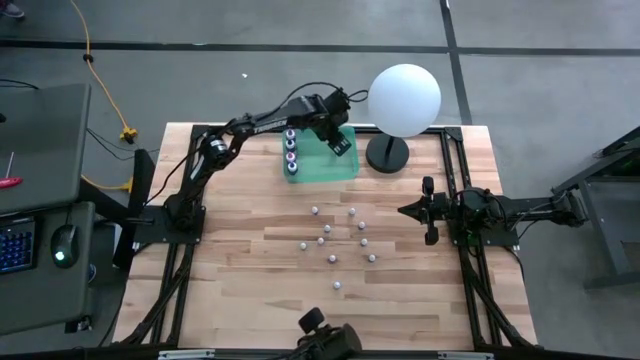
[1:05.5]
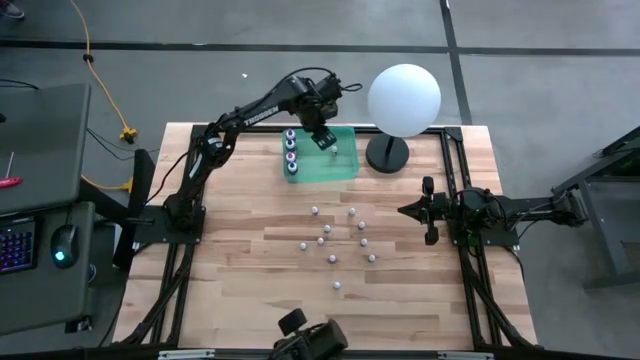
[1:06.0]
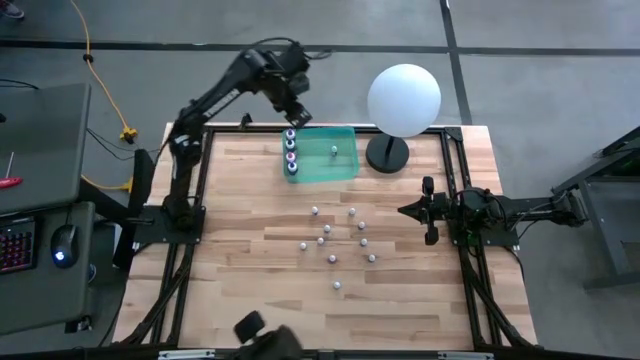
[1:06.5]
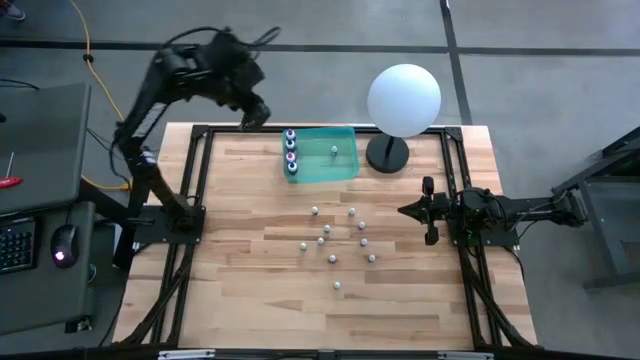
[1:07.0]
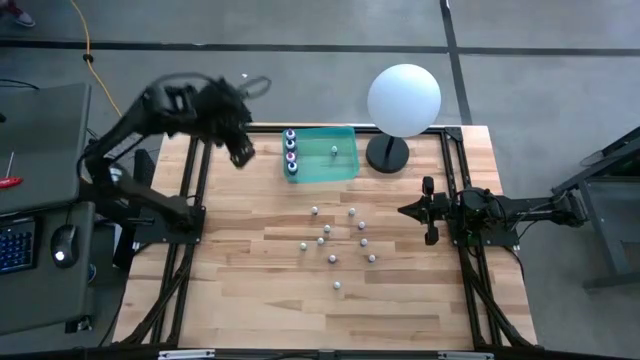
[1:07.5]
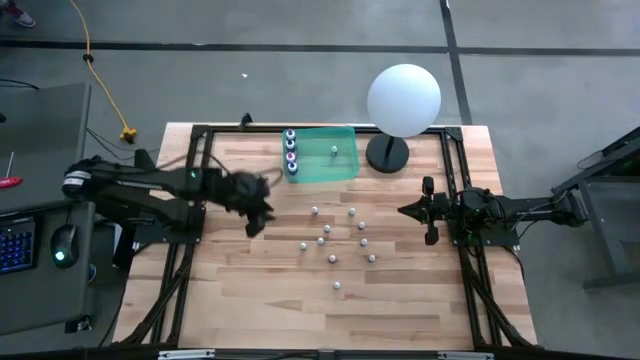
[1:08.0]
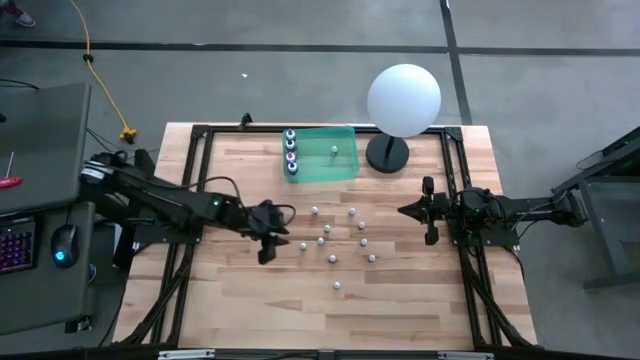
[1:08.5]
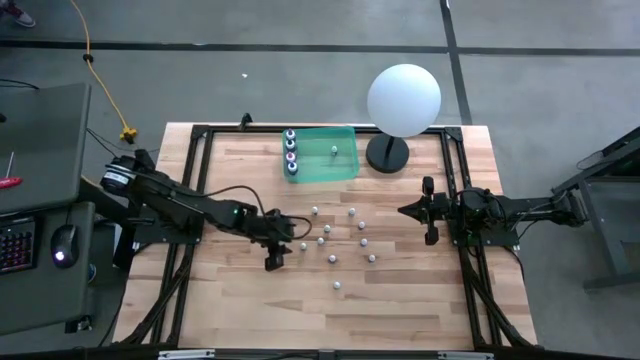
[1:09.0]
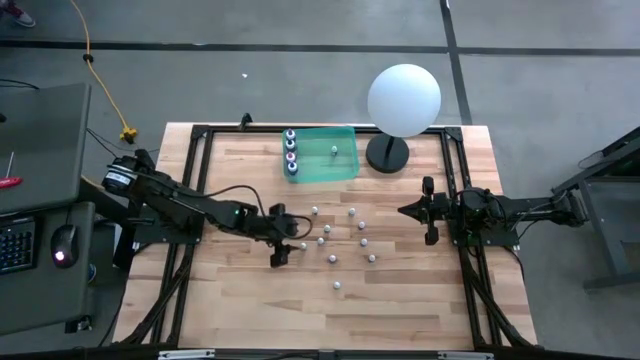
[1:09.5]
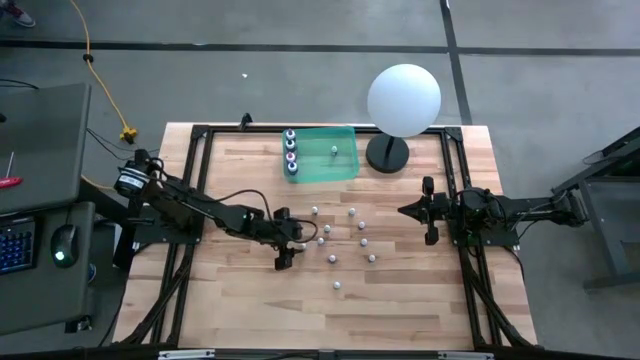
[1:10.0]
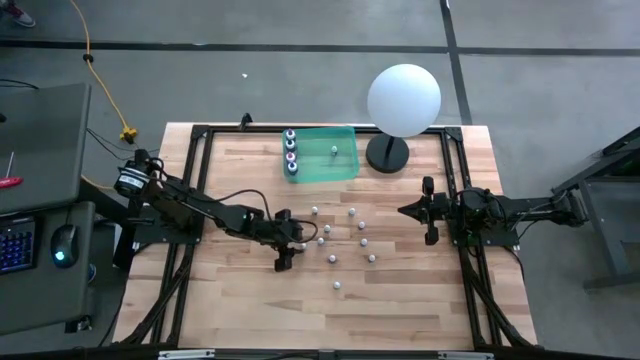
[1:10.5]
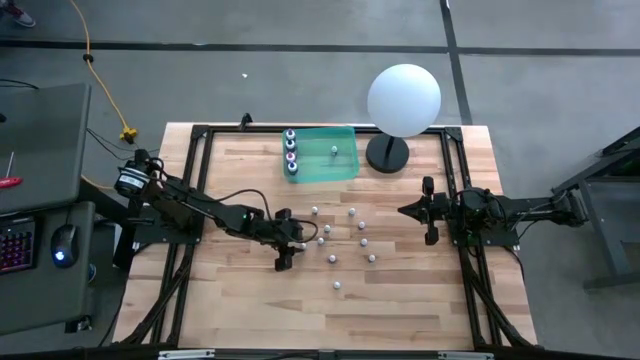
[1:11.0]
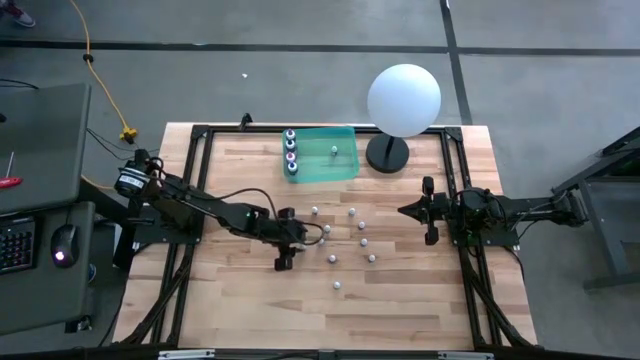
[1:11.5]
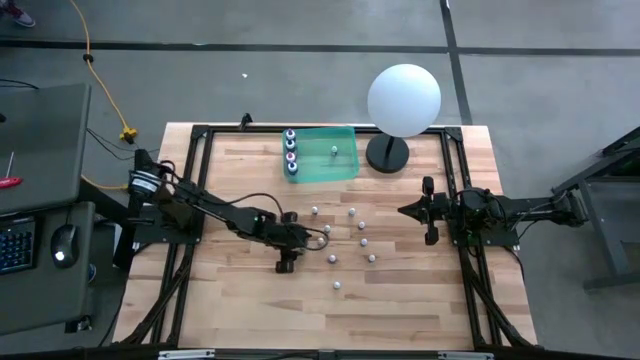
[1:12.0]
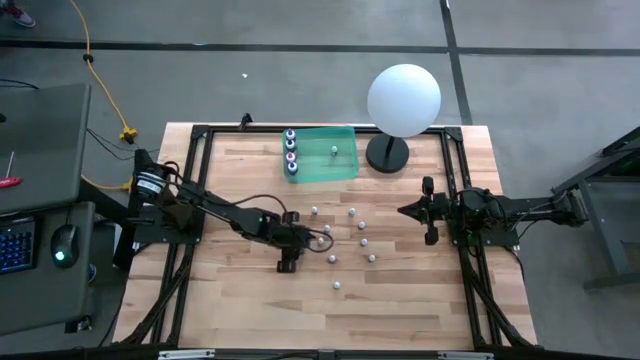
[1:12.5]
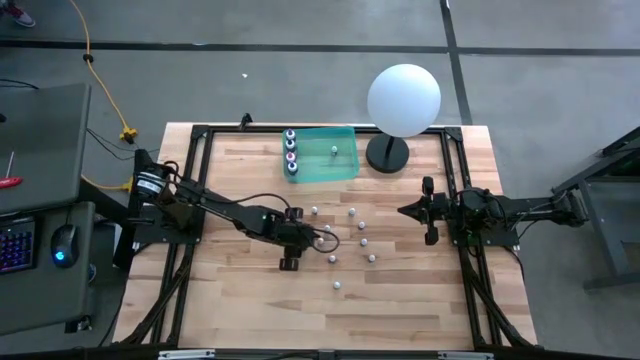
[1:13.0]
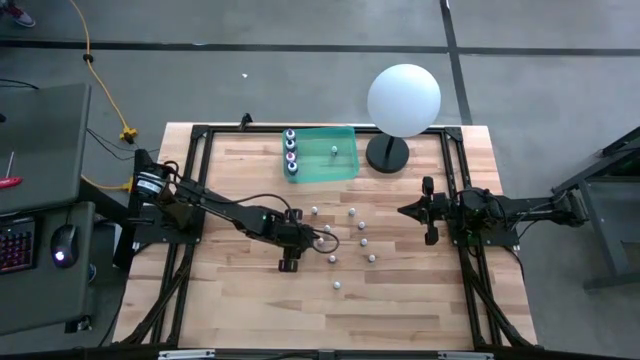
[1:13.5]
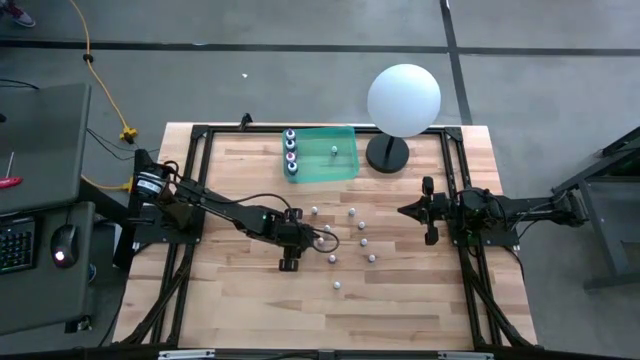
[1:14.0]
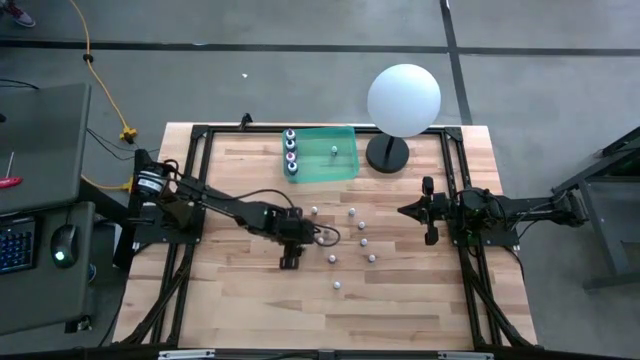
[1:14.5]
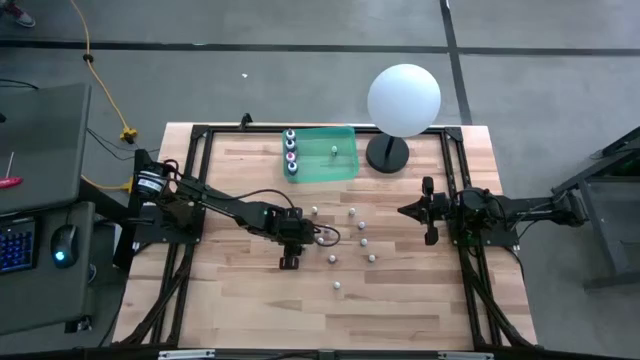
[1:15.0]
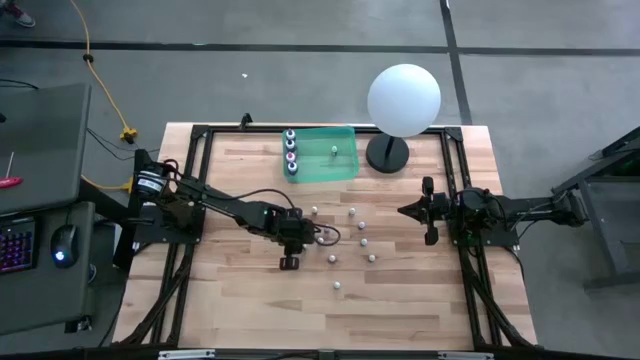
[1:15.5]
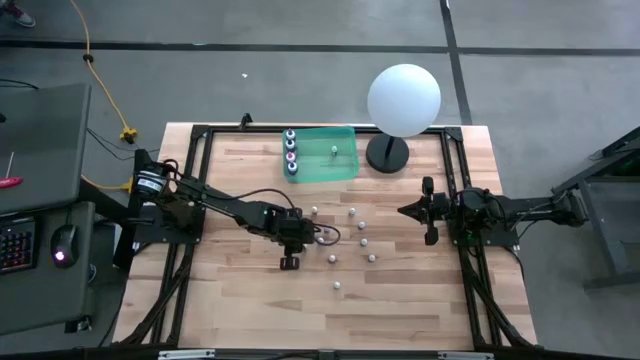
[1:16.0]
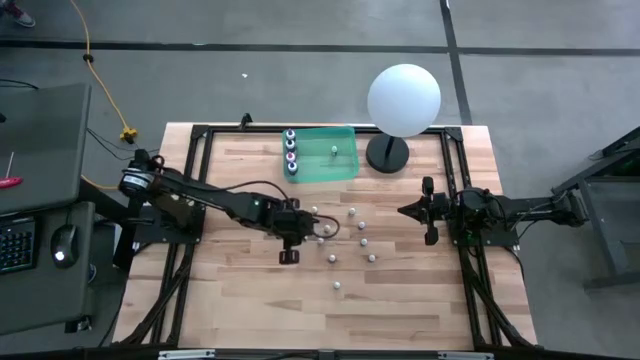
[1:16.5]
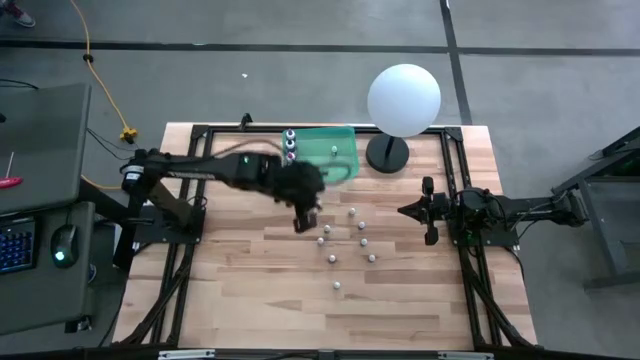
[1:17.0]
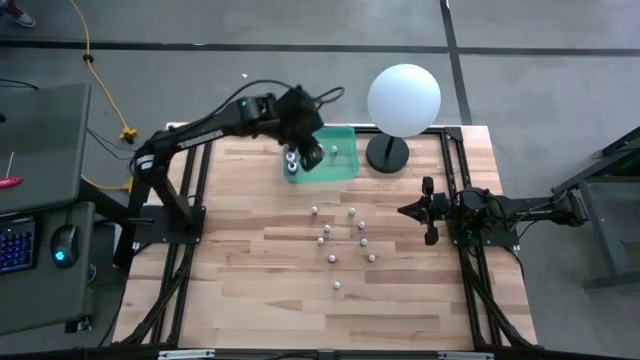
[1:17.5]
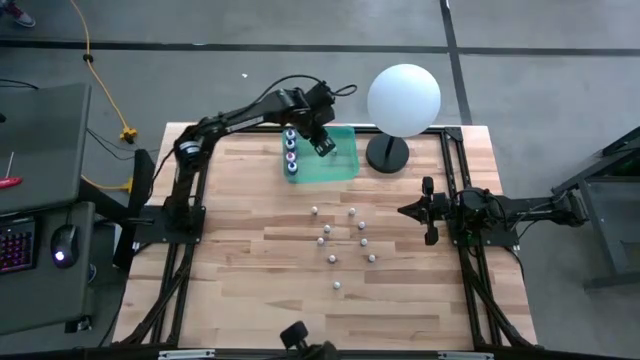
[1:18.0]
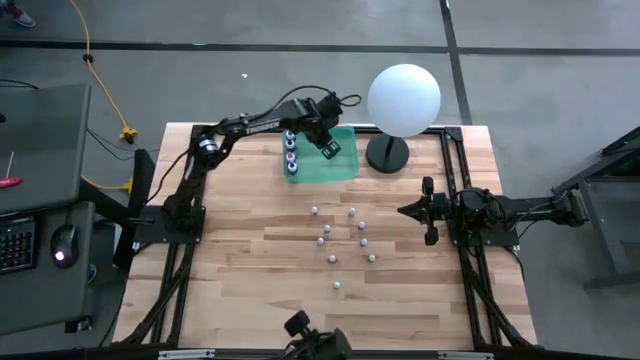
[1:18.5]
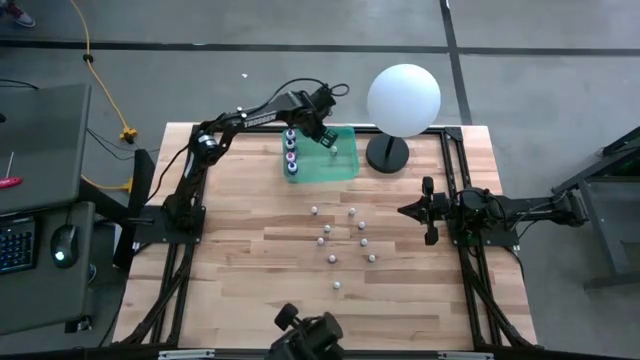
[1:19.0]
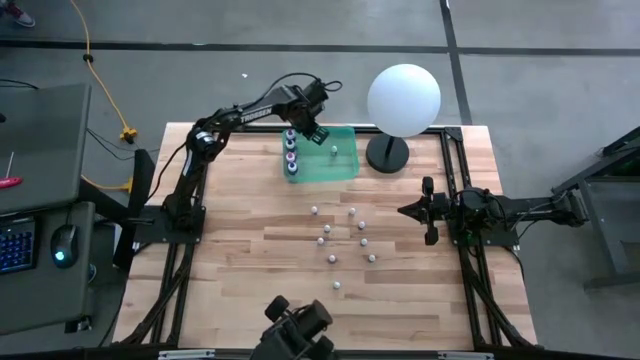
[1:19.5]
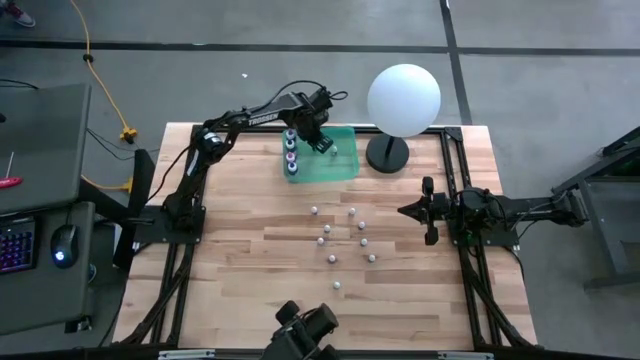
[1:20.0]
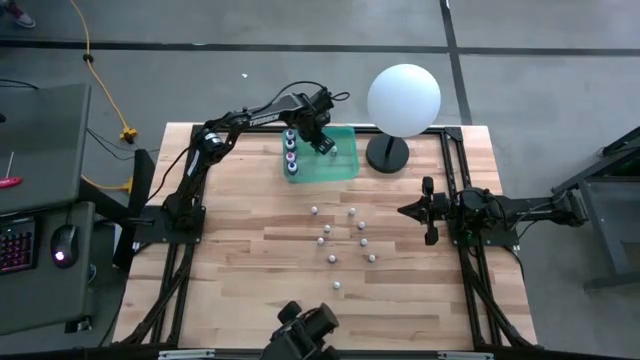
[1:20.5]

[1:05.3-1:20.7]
Task: Pick & Place food coloring
Put the small light green food coloring bottle into the green bin

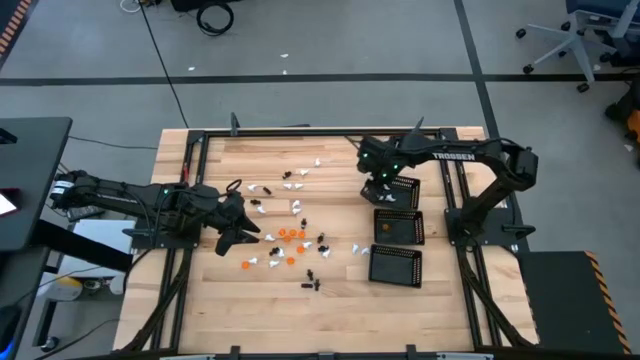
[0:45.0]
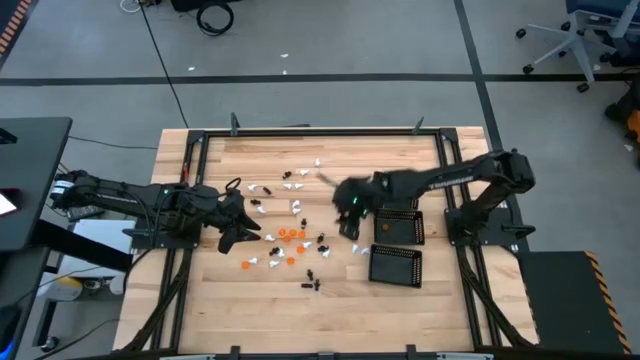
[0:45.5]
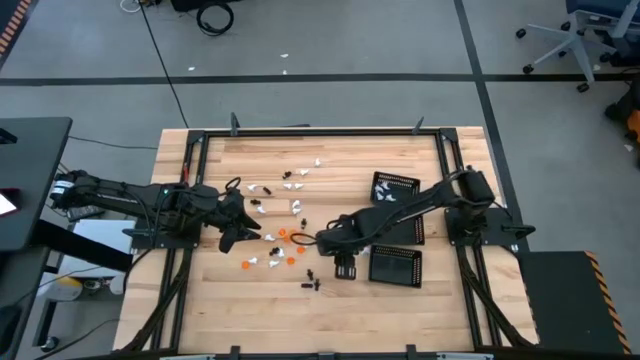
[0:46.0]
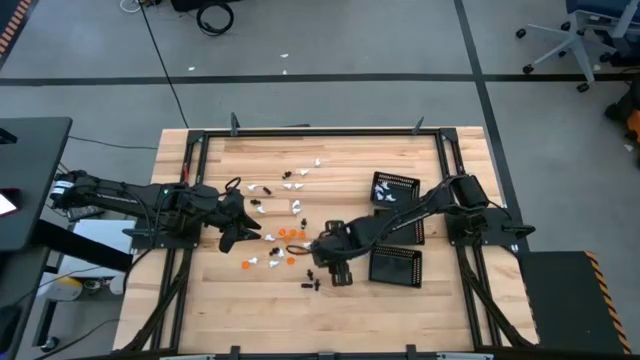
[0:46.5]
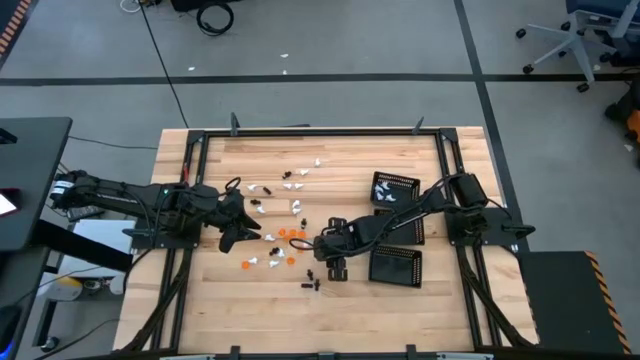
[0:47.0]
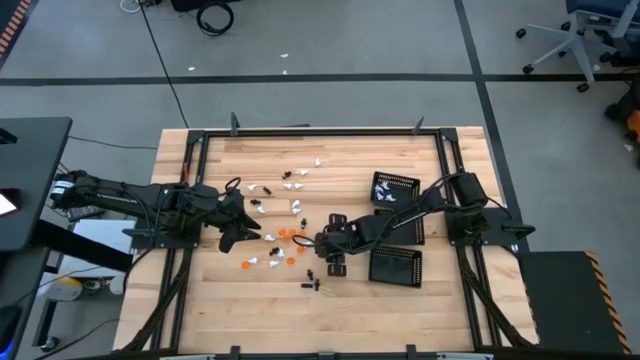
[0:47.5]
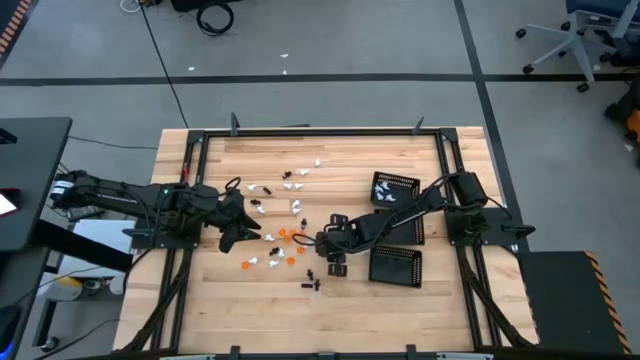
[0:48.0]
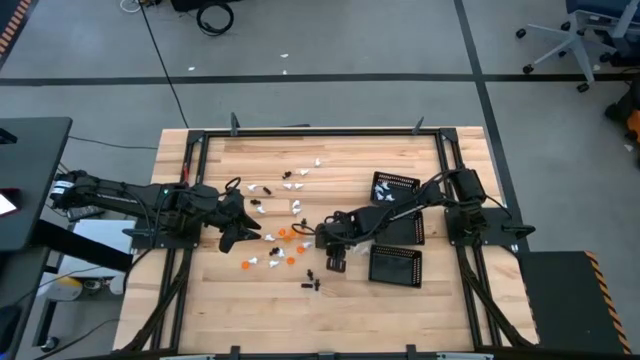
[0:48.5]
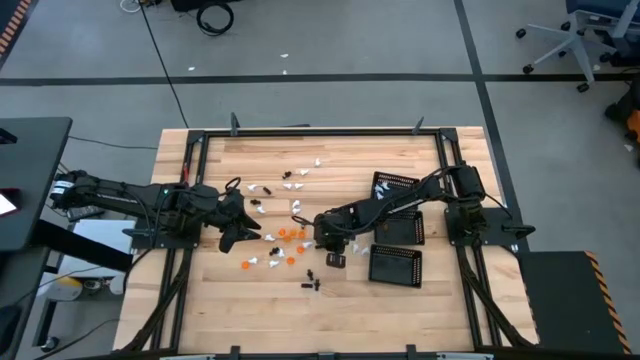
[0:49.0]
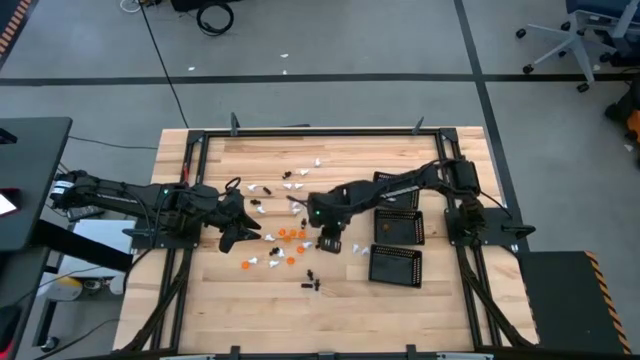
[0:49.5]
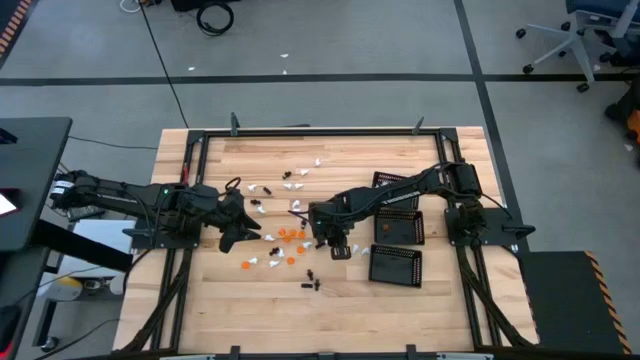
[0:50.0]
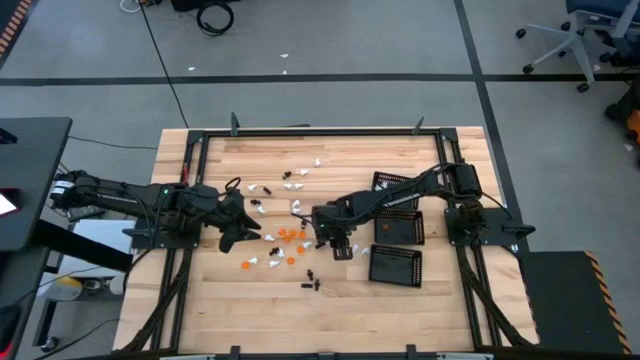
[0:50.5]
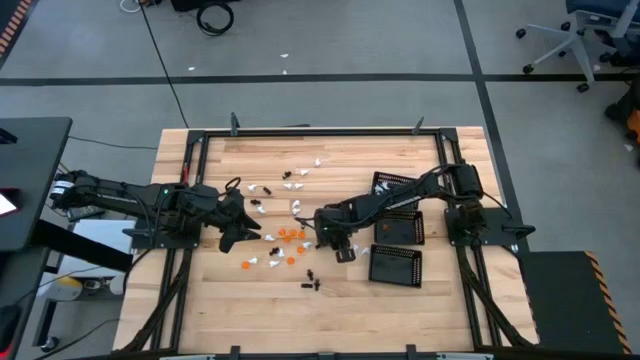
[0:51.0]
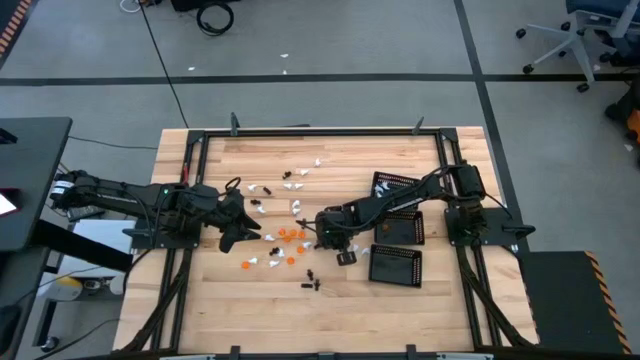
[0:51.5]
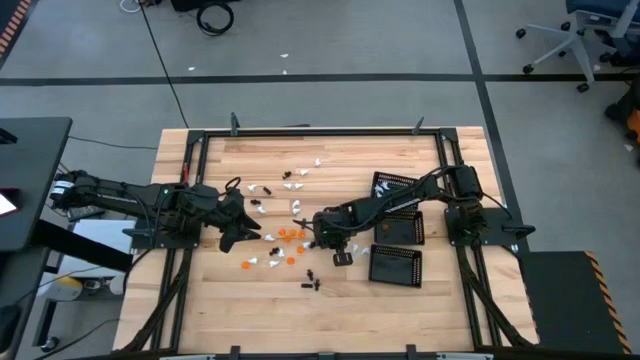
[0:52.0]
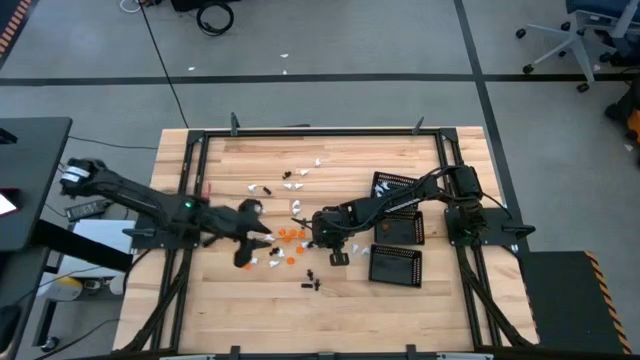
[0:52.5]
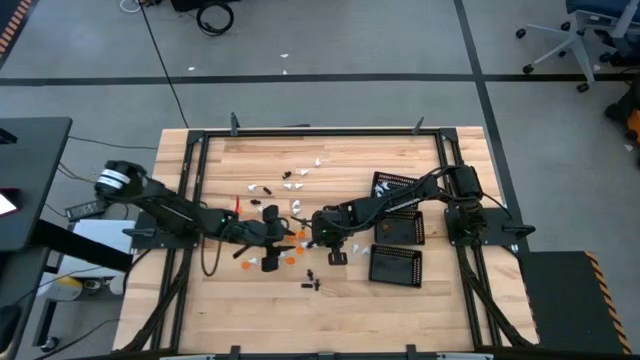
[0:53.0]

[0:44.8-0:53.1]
Task: Sort Halloween decoration
Put the black ghost toy into the bottom black bin
